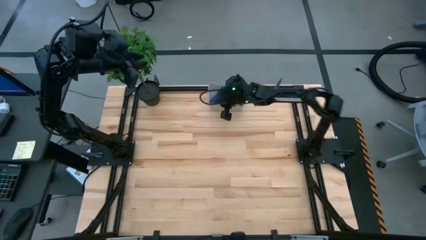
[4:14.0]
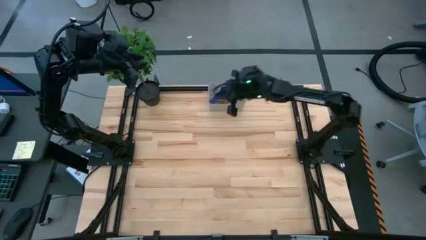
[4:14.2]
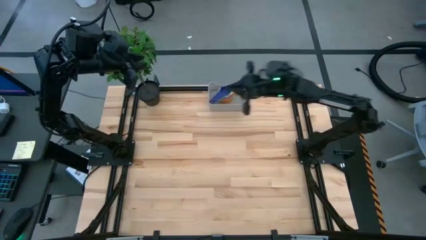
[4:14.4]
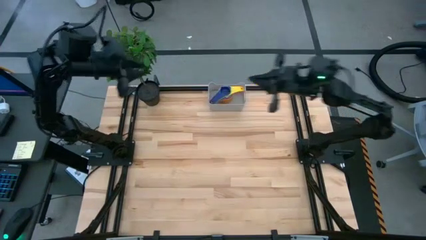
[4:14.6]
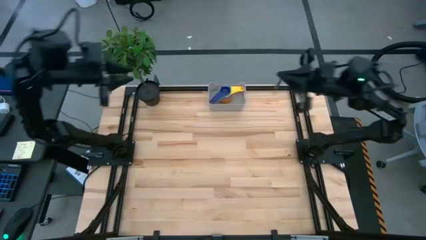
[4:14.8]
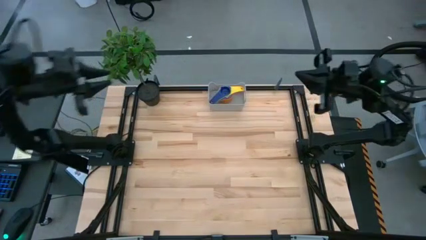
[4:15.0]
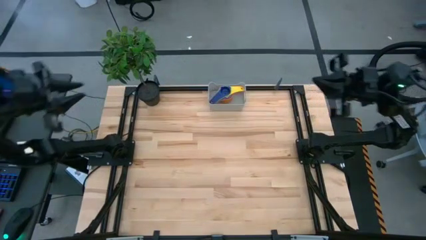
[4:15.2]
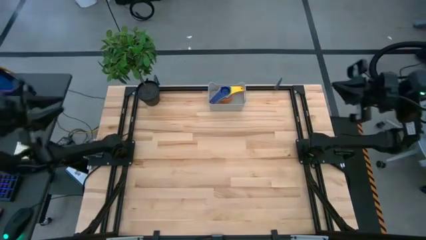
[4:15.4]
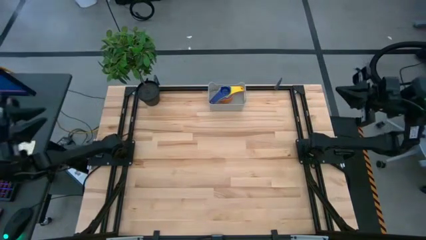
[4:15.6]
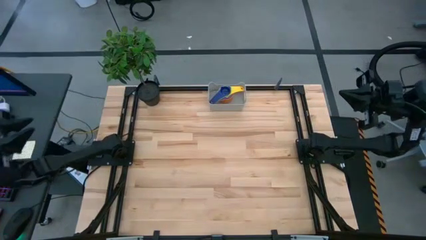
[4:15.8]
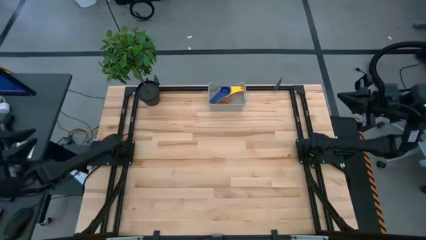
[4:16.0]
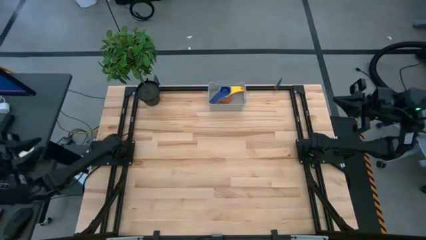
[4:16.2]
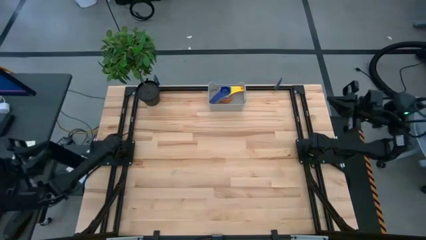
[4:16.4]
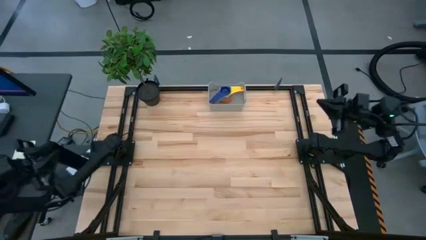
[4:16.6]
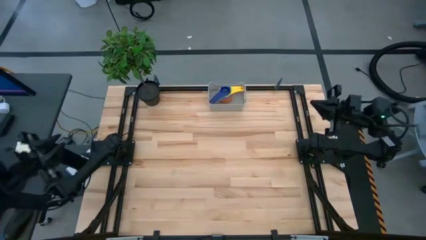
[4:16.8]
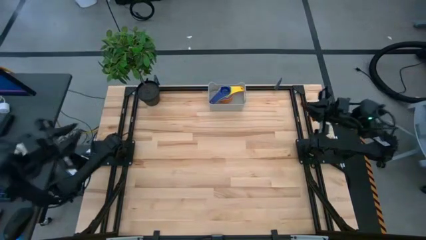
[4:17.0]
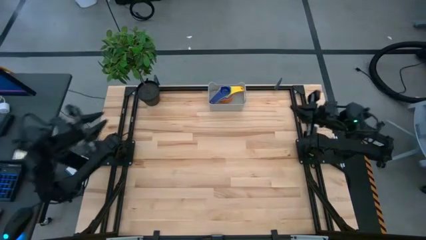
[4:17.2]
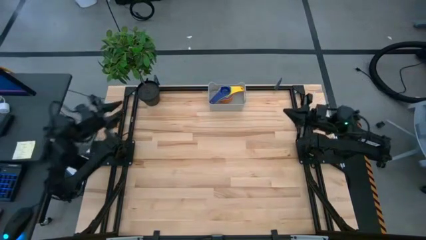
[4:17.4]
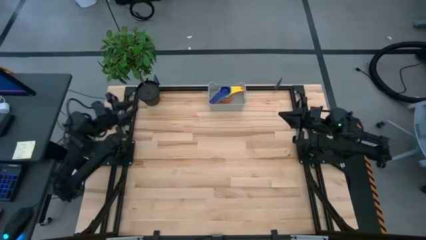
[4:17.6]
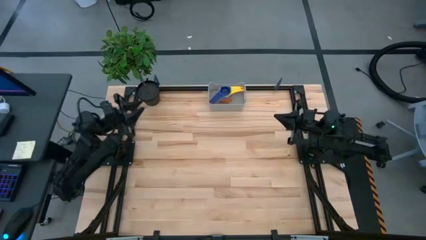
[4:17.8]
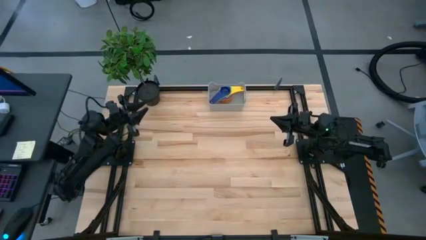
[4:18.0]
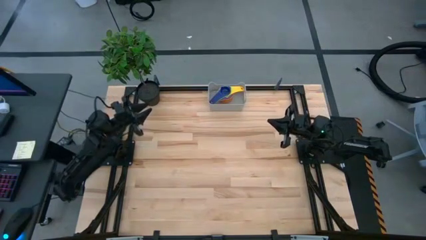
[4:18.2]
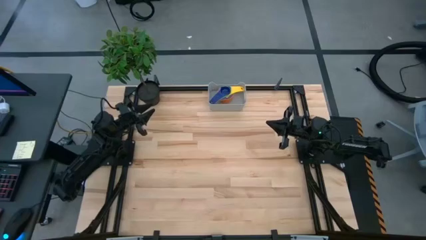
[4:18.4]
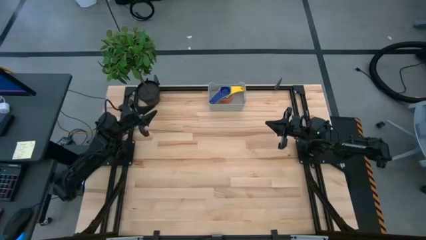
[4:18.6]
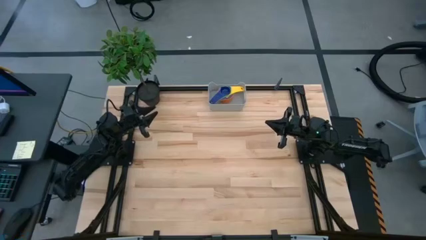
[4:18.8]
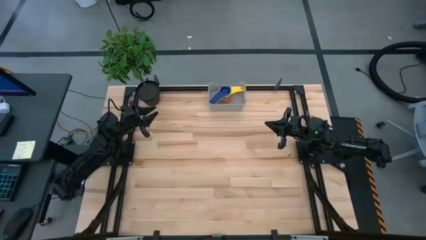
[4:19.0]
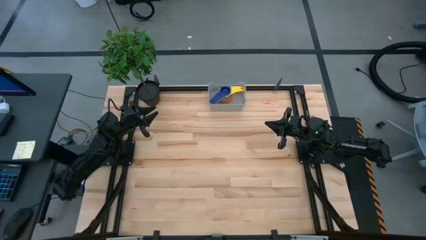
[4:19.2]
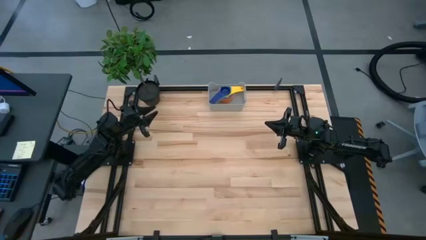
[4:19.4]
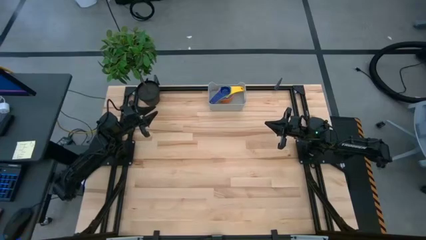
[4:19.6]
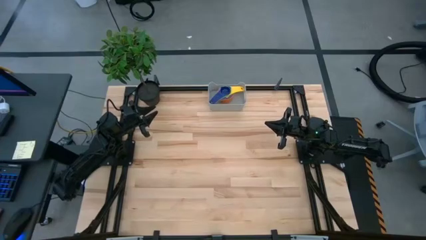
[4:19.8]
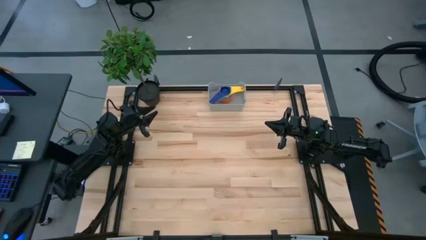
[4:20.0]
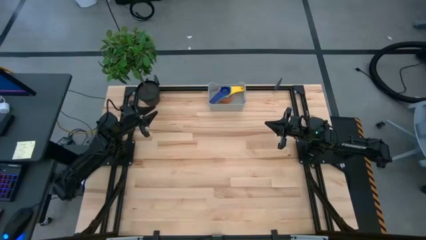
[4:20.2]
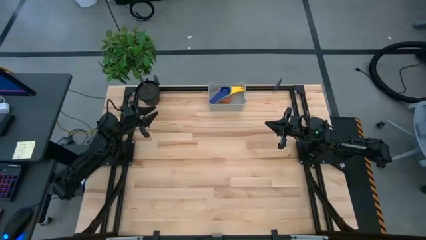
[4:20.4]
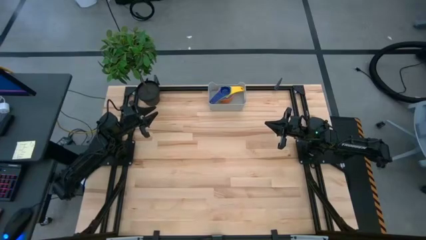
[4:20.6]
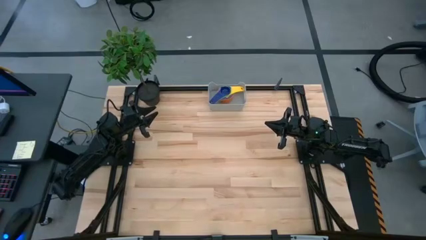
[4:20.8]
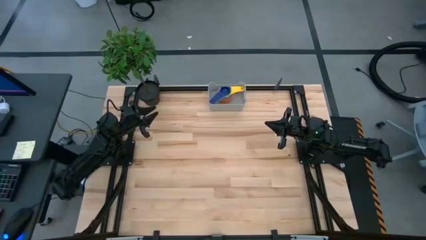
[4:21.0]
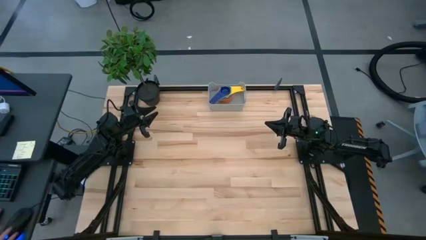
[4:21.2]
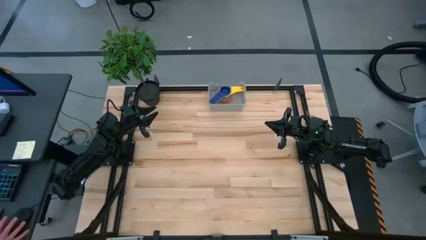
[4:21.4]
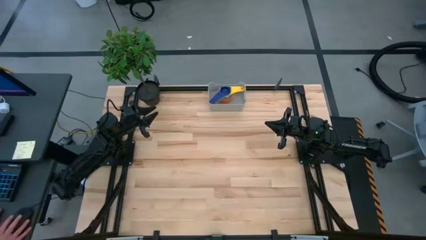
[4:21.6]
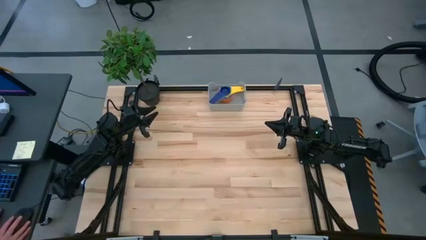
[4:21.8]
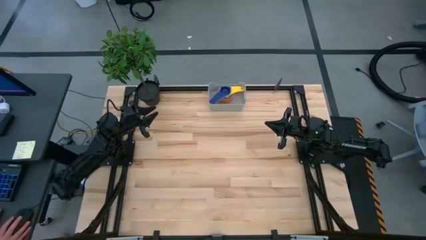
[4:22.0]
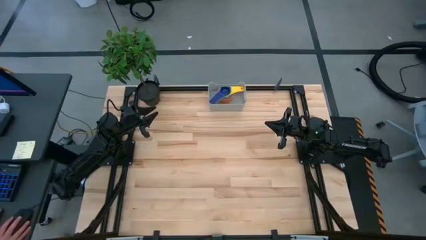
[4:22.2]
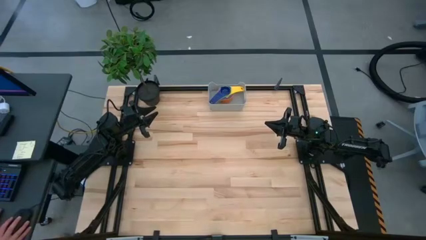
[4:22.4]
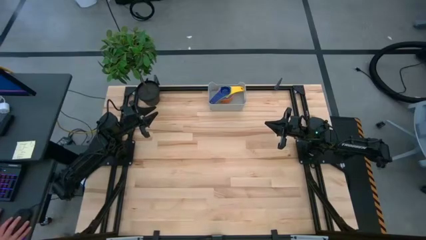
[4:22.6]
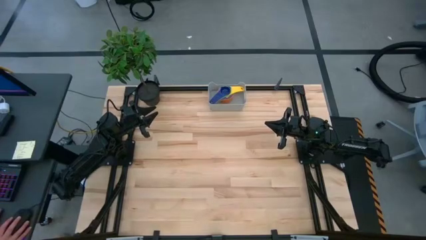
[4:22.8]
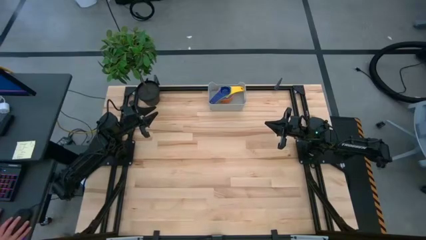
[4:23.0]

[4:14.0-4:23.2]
Task: Nest measuring cups in basket
Return to Home Position

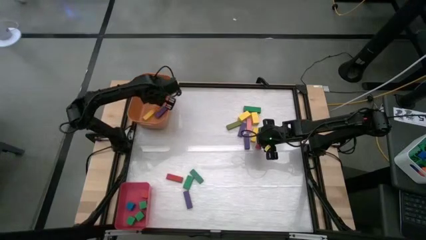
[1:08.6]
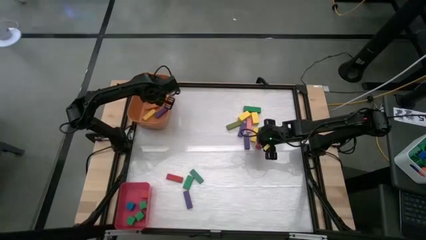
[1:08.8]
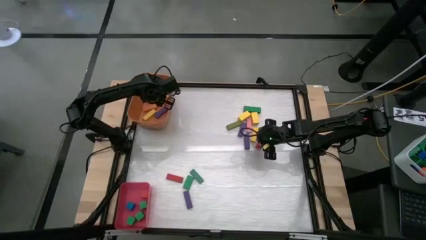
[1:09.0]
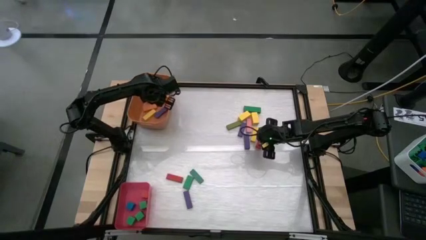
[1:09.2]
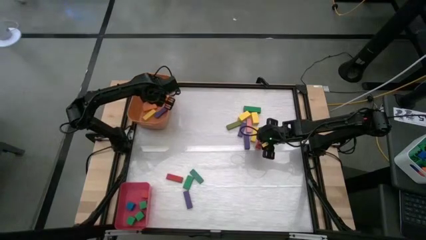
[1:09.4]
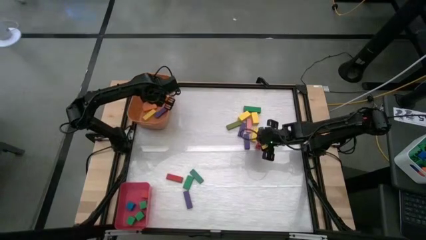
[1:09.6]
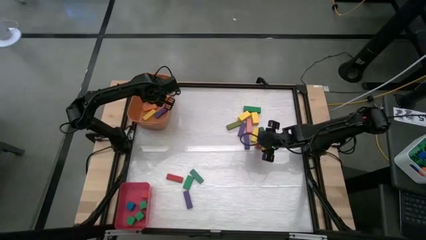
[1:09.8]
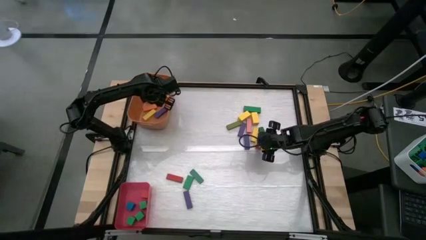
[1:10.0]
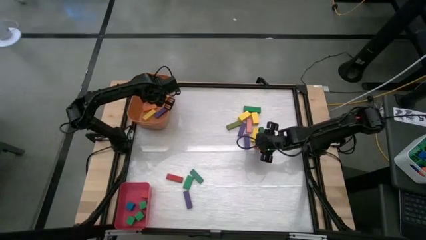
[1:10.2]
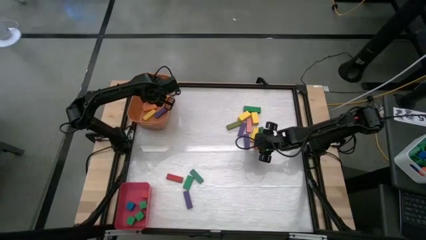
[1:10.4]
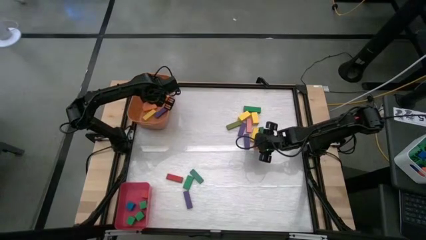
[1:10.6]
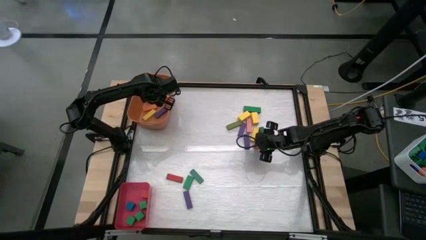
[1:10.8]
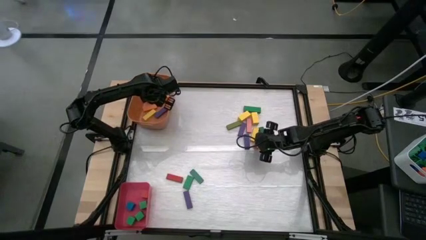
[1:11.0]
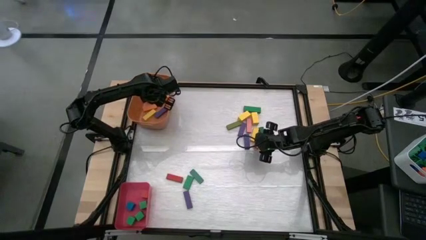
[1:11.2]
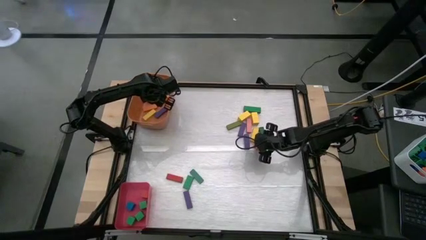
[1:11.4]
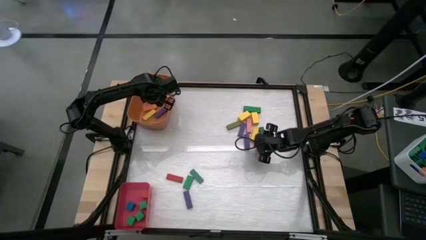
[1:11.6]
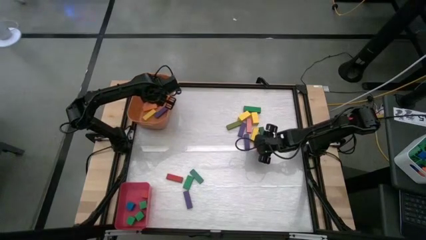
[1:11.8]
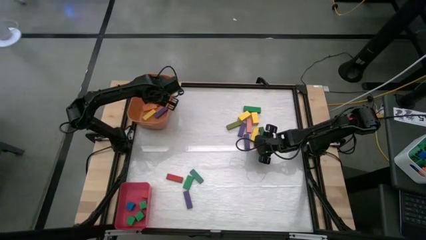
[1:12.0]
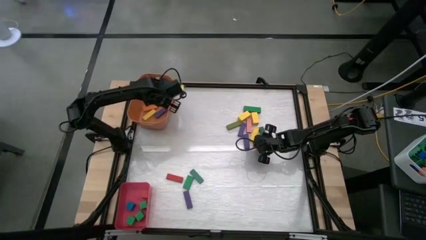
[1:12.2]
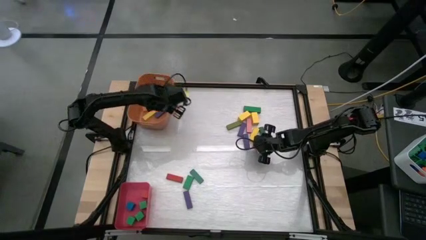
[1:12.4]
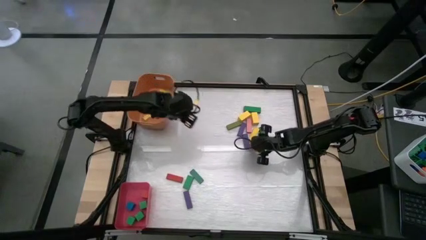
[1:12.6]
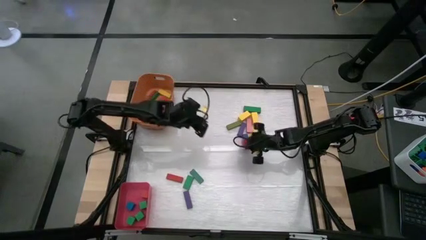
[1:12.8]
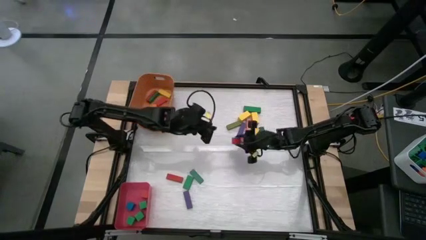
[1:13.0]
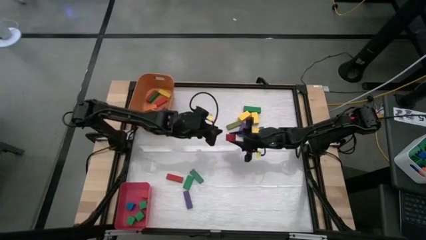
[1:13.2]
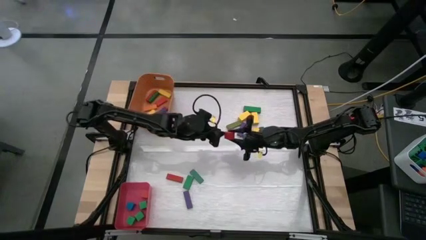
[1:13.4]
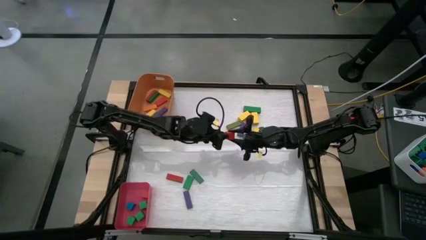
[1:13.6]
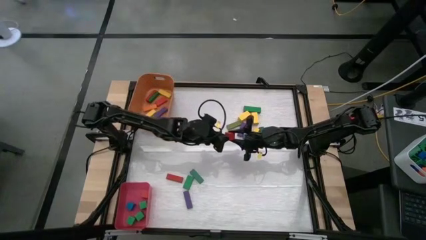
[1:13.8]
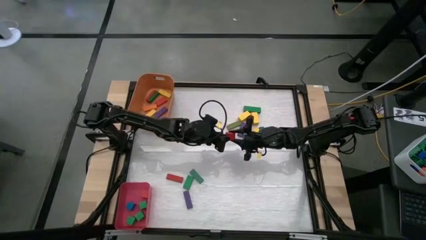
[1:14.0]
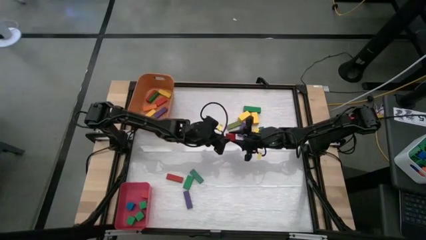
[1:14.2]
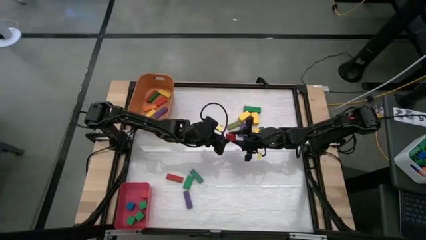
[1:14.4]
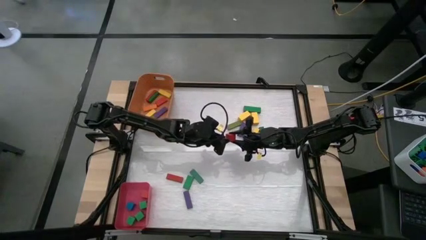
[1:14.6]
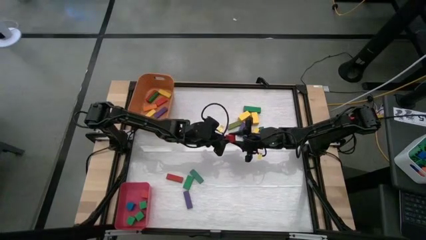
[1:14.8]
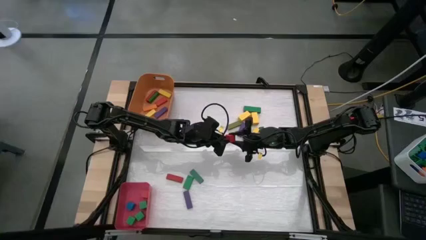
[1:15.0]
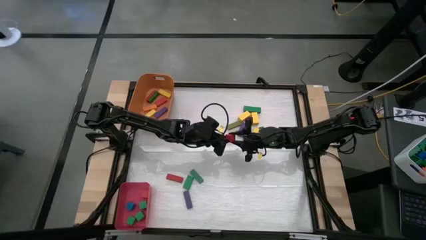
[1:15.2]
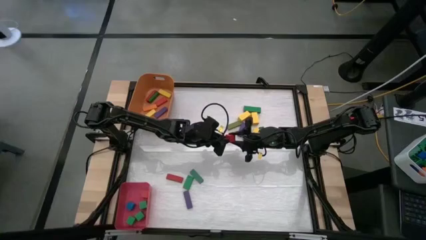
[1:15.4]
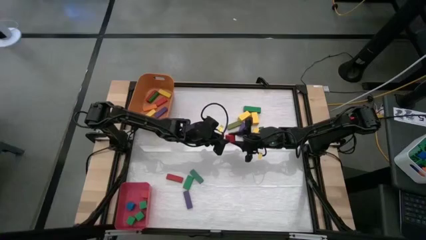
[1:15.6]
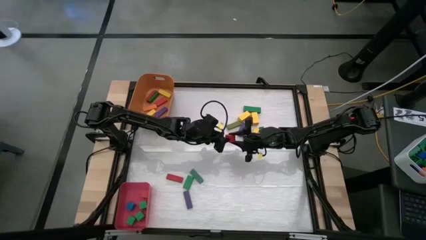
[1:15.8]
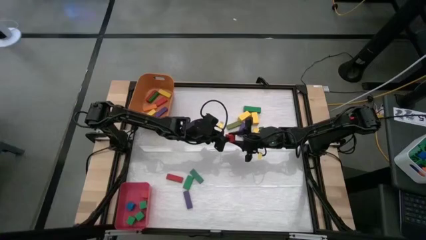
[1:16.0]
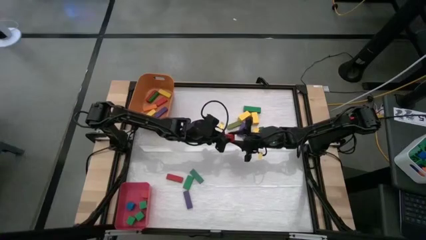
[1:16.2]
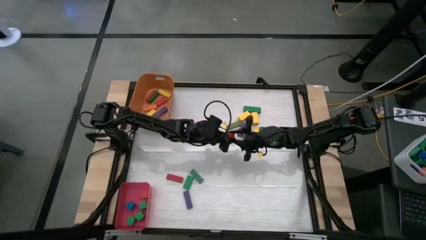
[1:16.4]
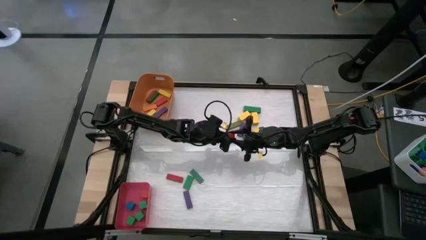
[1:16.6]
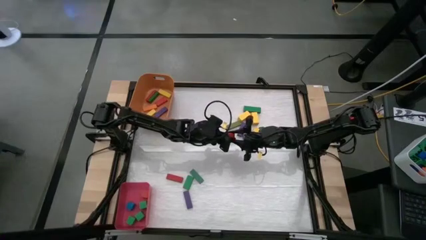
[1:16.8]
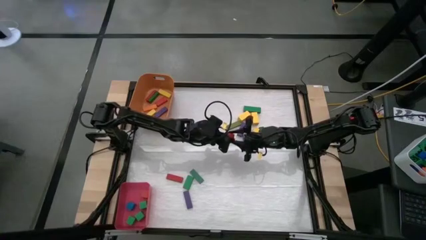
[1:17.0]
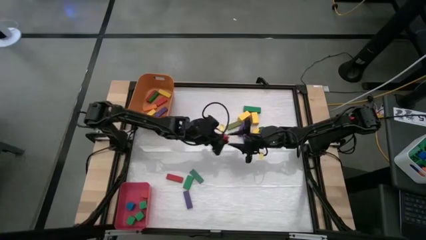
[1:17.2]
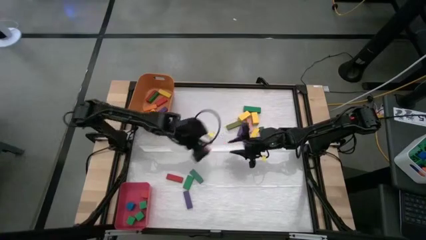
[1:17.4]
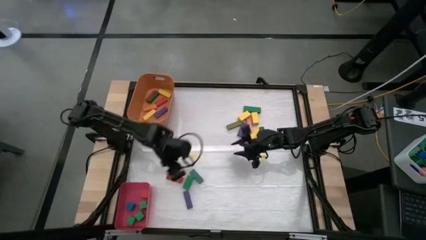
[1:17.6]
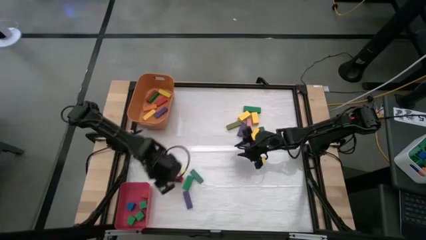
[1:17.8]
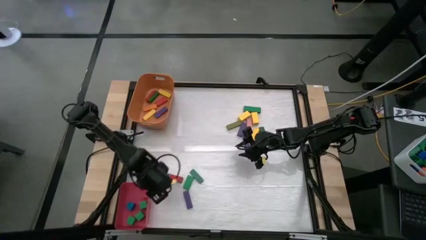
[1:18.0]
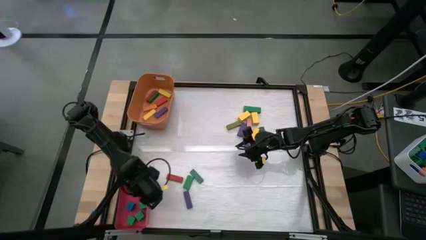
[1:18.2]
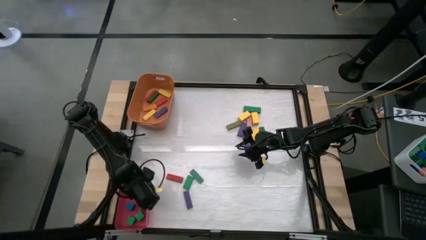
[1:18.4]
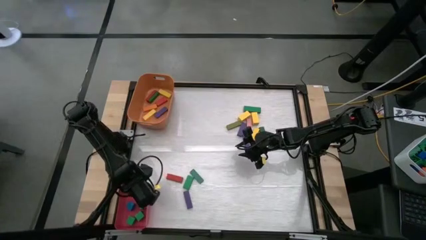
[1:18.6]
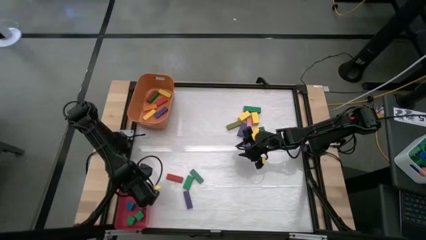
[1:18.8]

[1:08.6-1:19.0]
Task: Sort blocks by size
Put the small red block into the red bin
